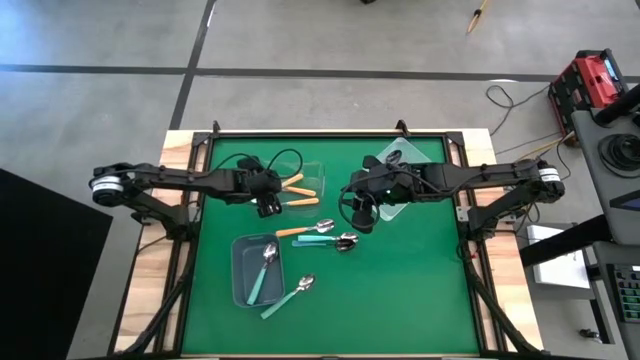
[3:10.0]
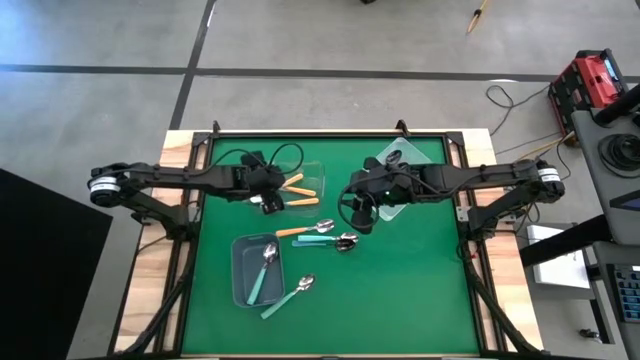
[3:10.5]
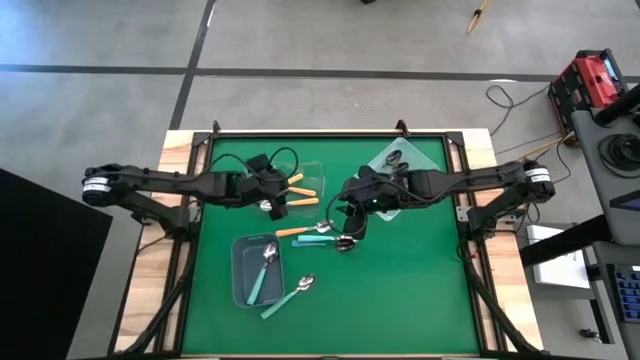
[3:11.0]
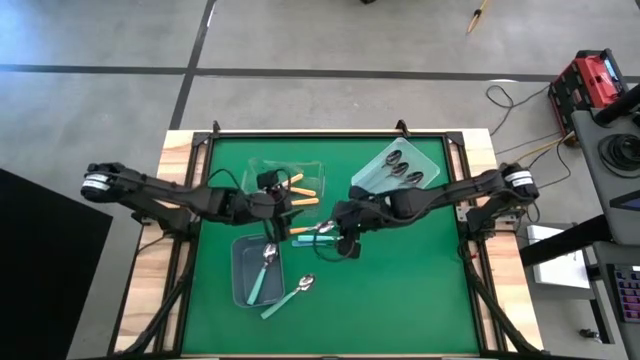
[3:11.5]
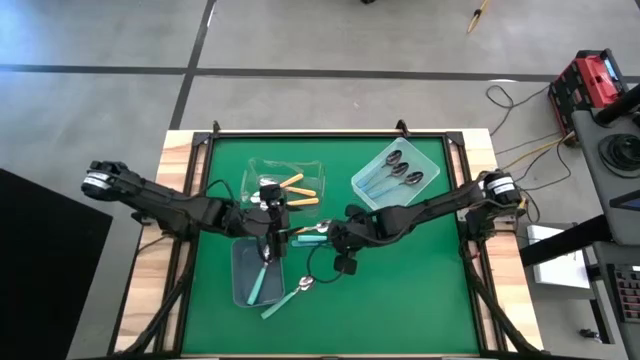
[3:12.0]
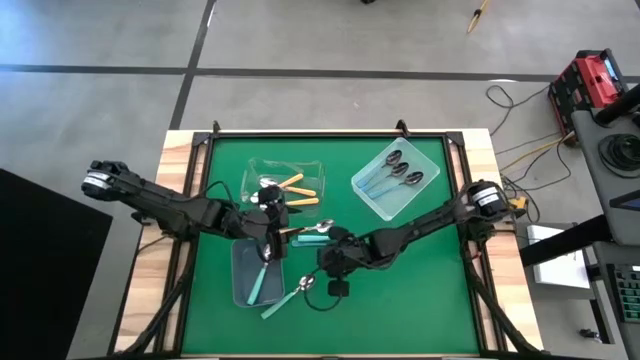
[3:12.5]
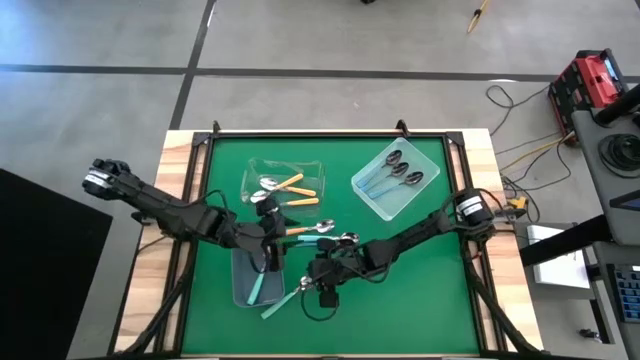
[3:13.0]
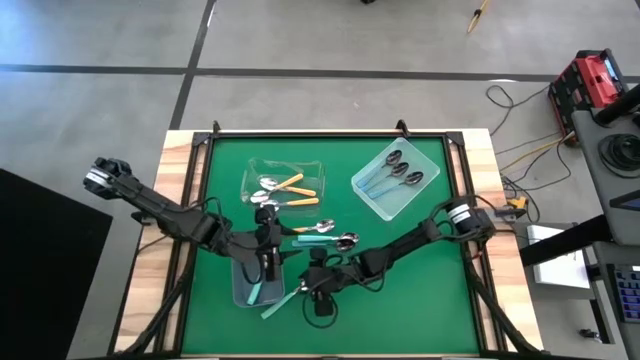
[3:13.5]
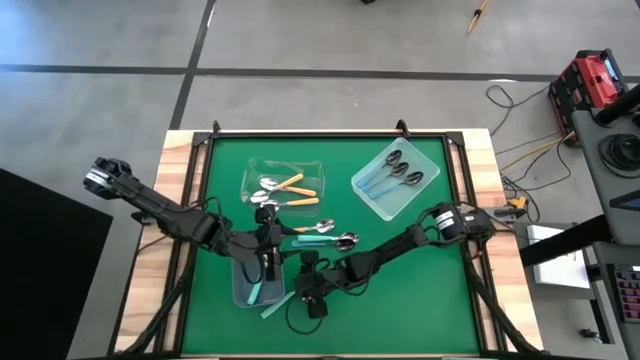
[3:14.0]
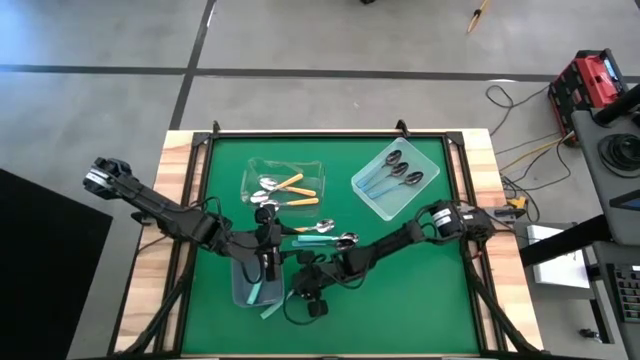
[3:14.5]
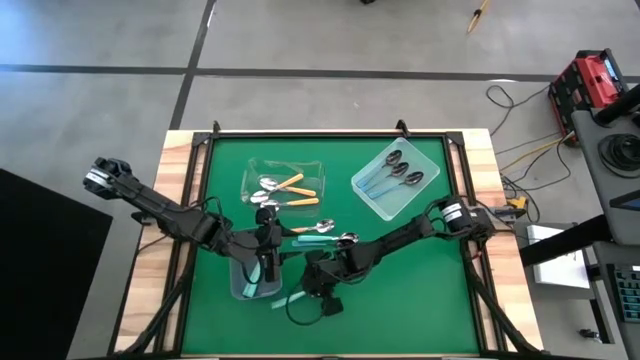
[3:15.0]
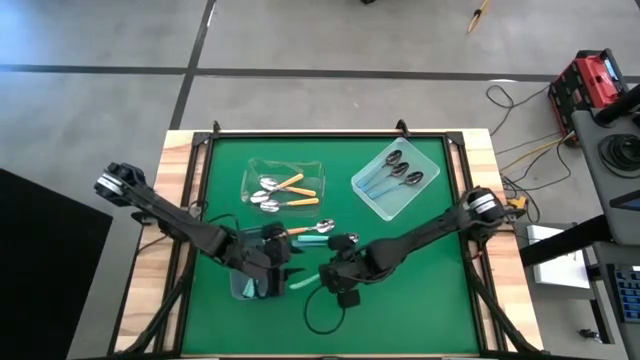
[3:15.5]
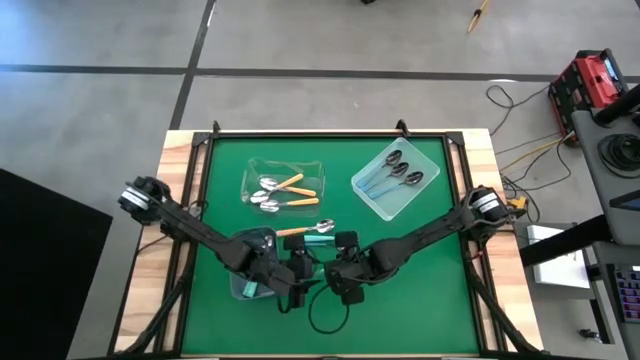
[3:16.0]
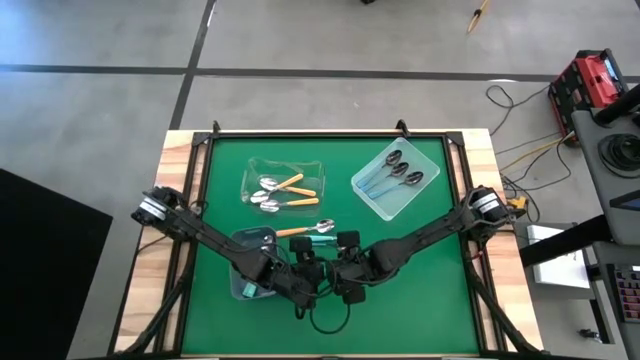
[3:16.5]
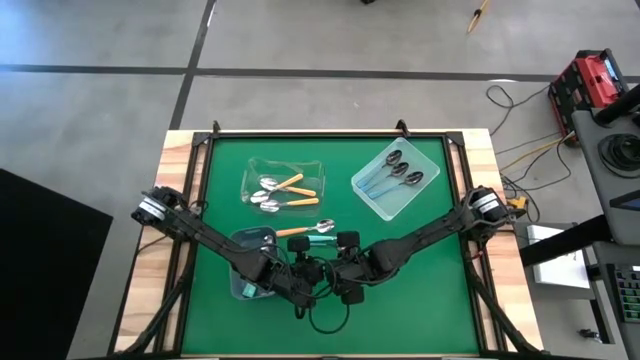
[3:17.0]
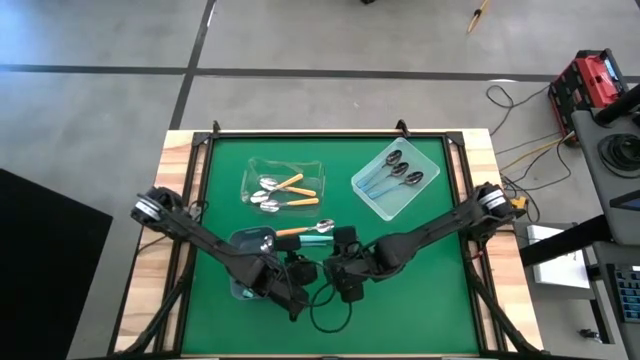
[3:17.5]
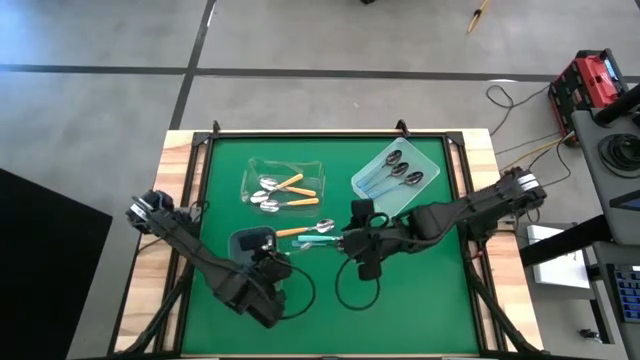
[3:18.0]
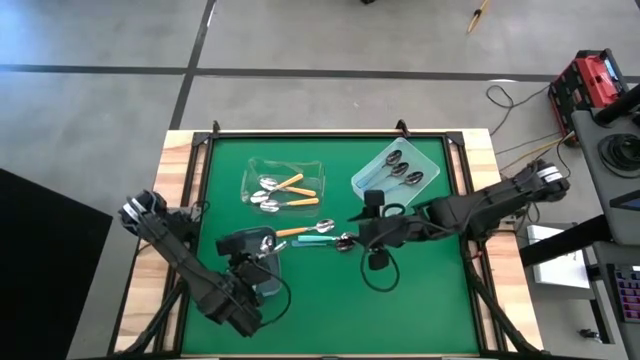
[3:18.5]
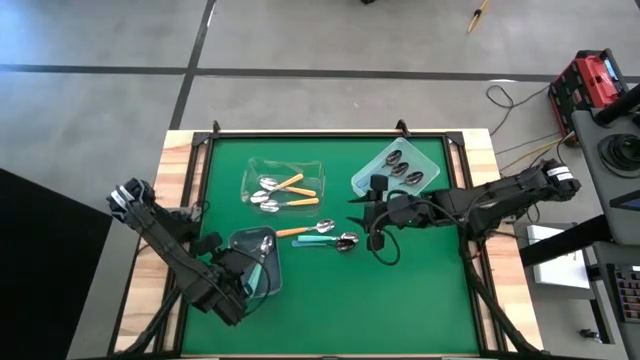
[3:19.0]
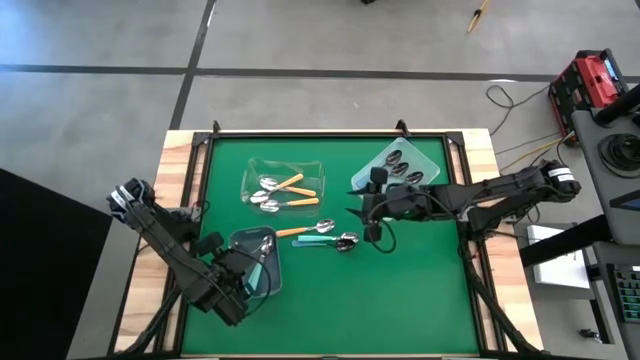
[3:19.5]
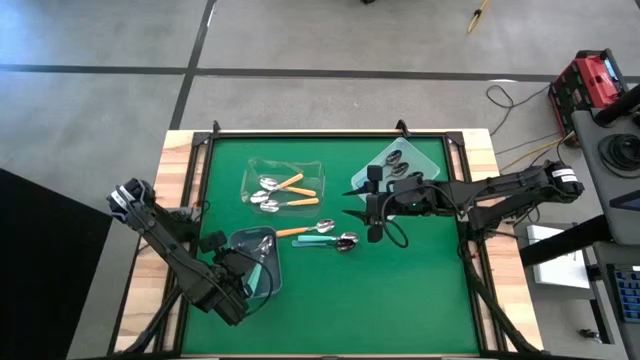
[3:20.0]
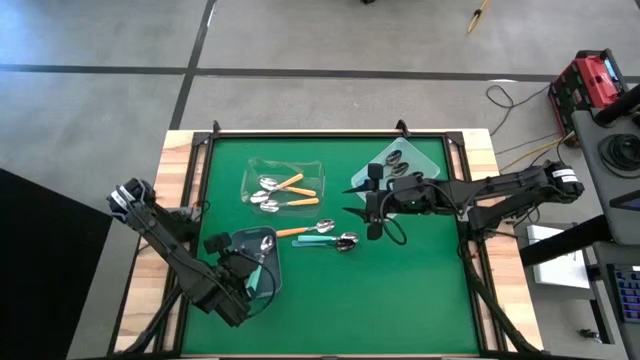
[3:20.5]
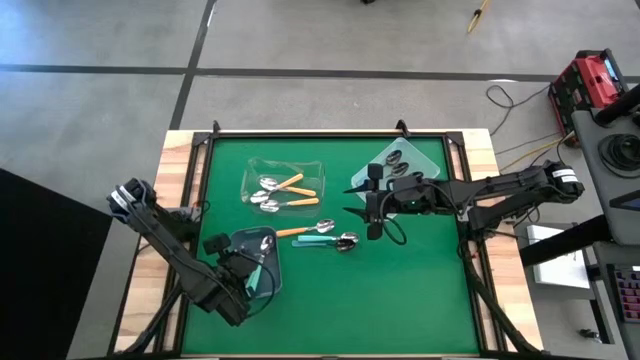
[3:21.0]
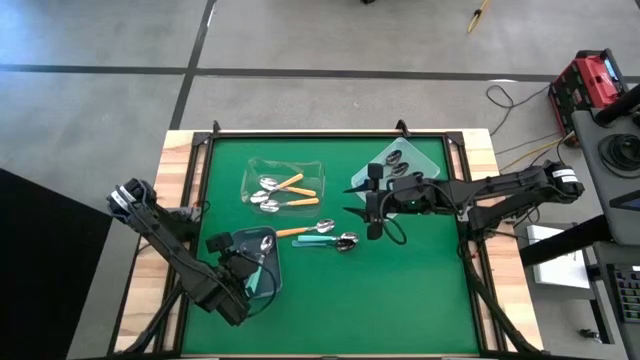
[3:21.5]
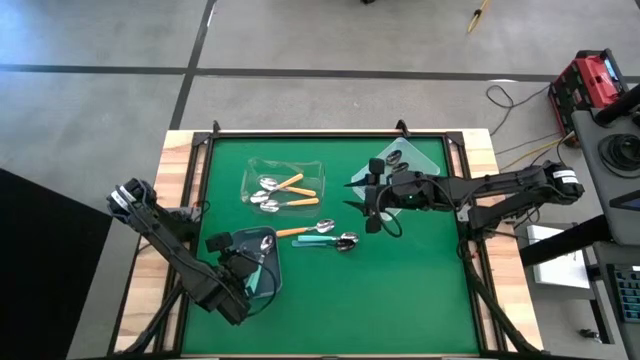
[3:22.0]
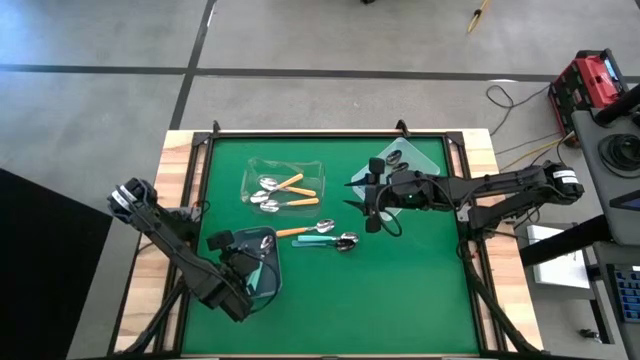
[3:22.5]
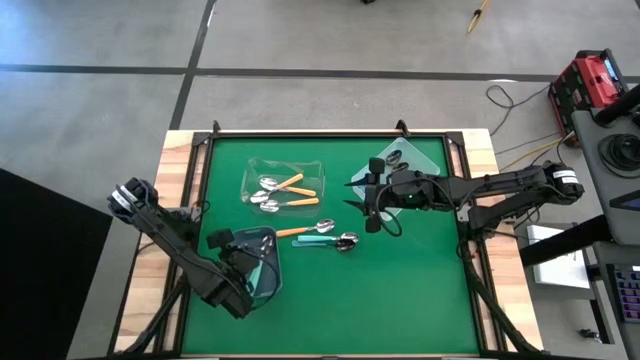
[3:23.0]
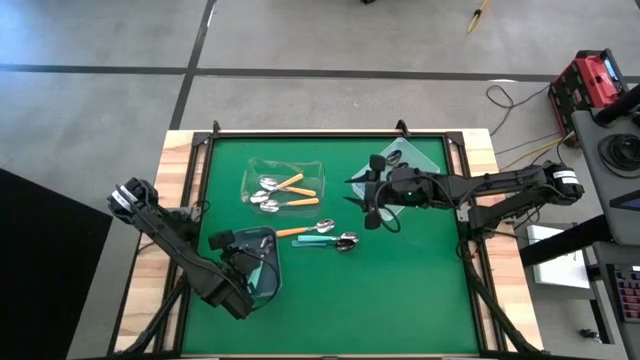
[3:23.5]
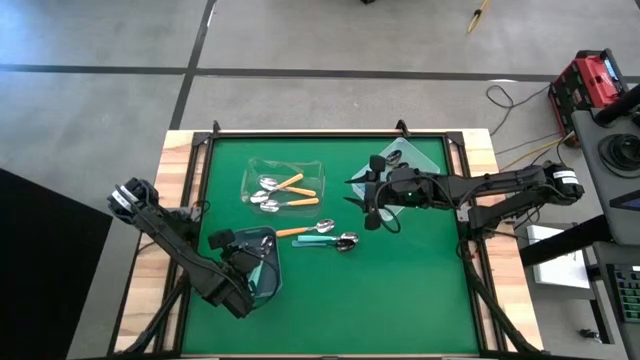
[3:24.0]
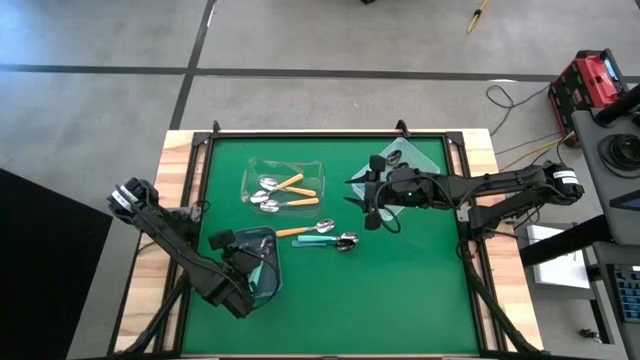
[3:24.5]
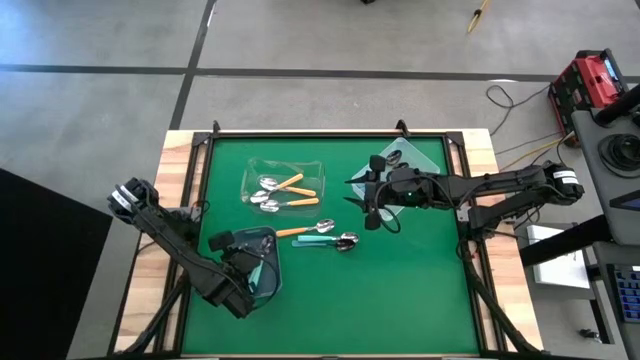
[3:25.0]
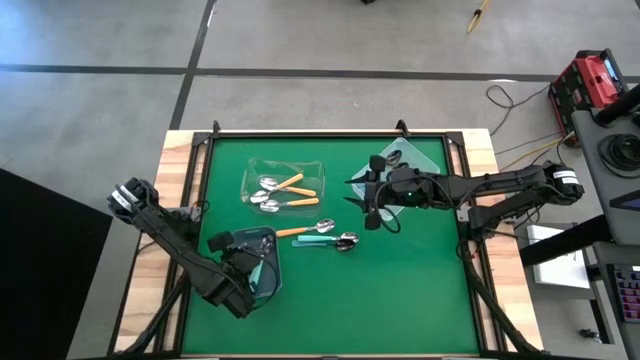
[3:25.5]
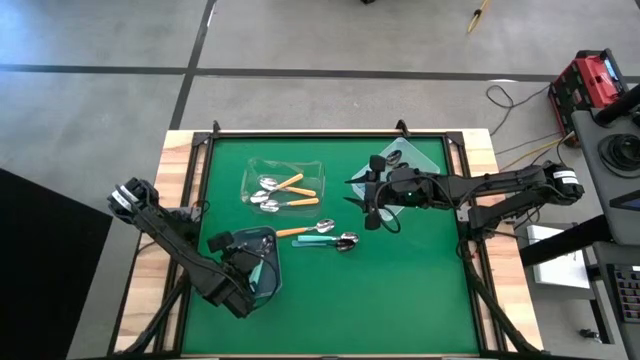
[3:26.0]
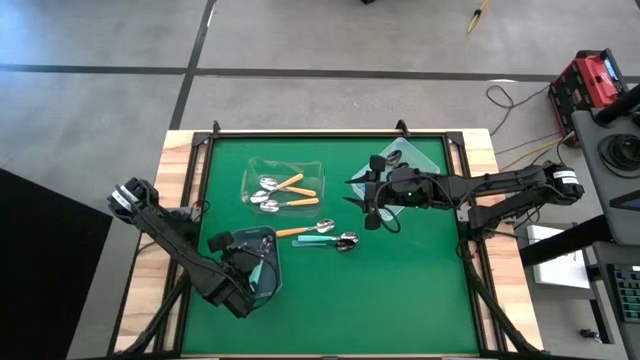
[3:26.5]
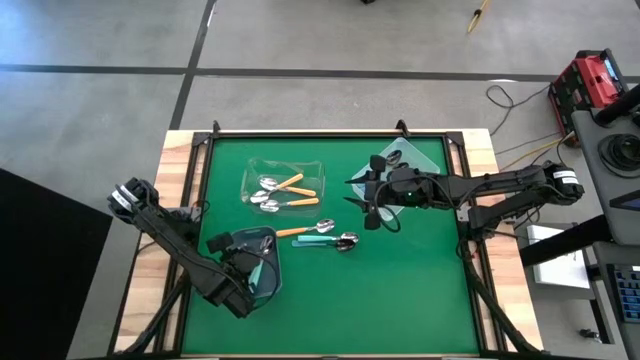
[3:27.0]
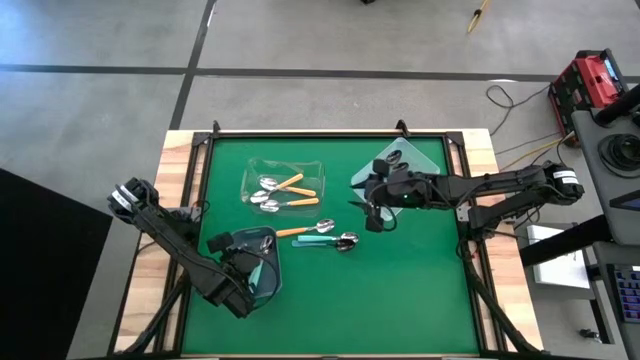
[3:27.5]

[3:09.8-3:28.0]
Task: Sort silverware by color (type)
Put the light blue spoon into the gray bin
